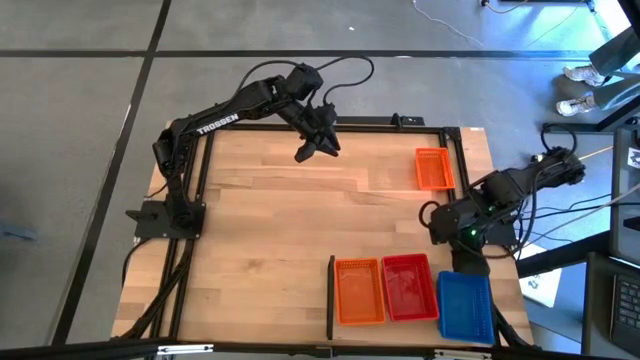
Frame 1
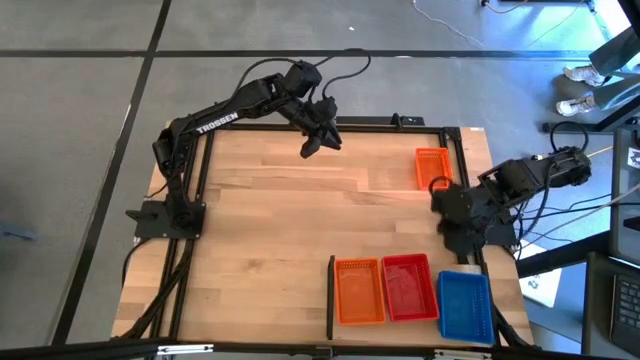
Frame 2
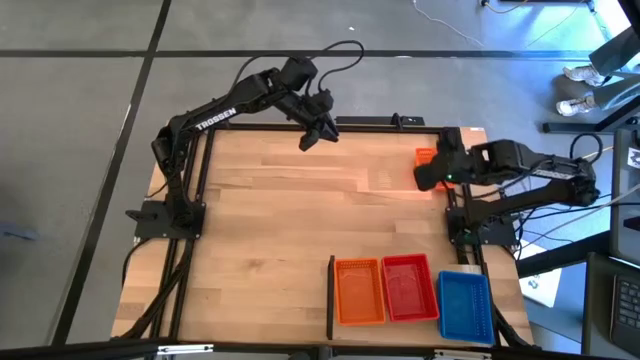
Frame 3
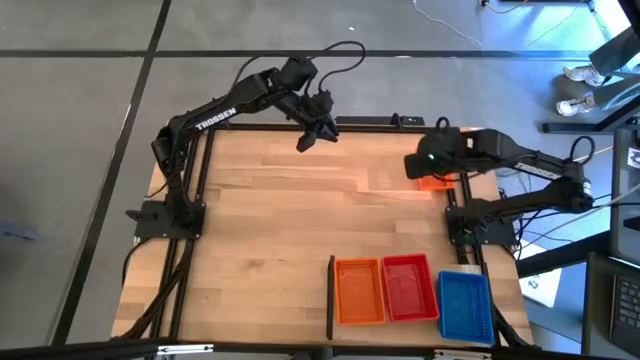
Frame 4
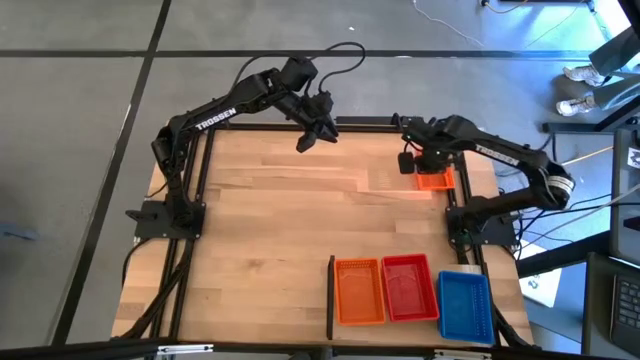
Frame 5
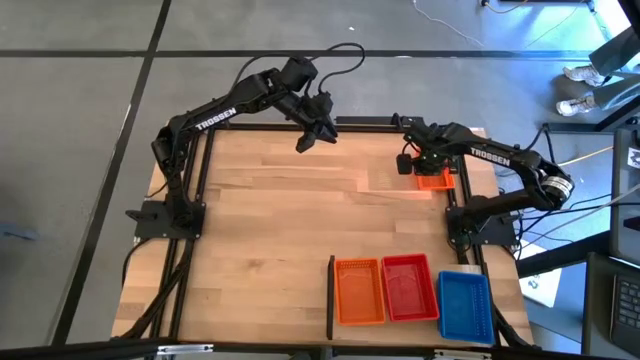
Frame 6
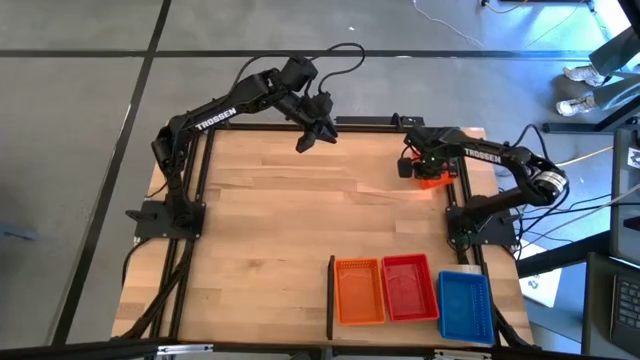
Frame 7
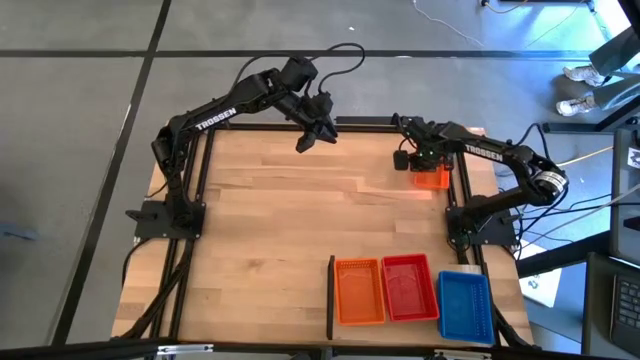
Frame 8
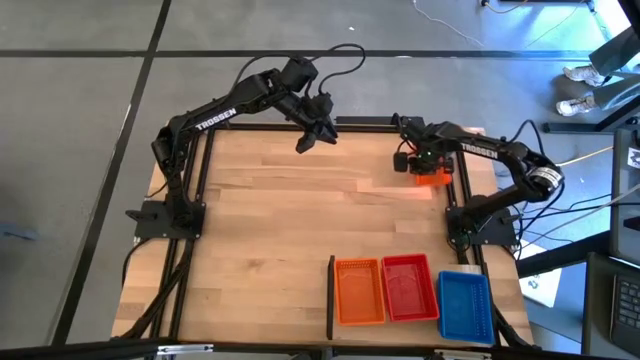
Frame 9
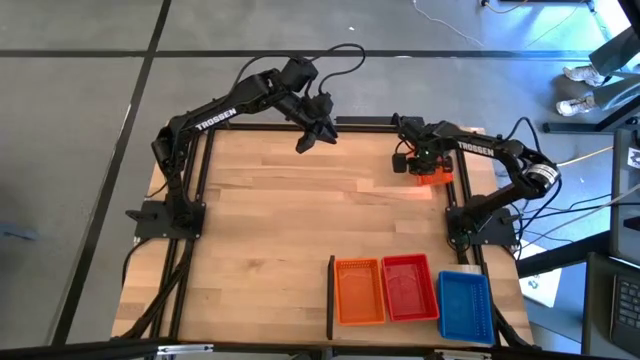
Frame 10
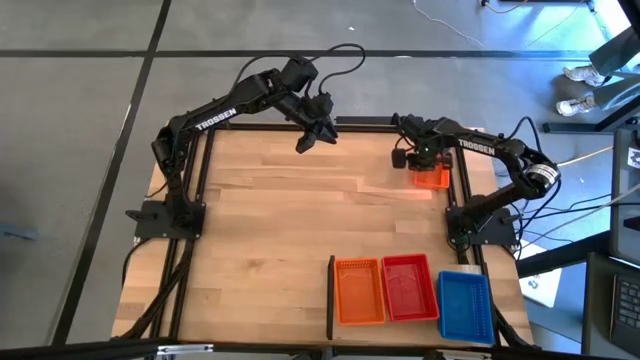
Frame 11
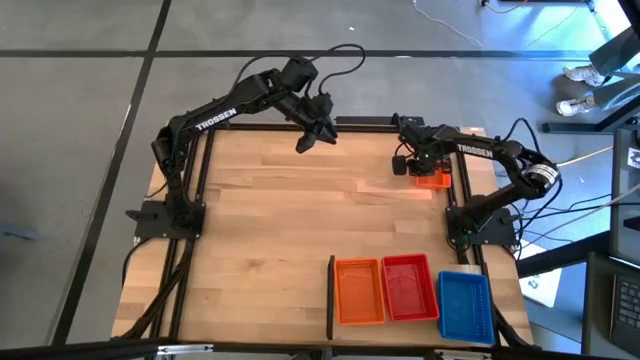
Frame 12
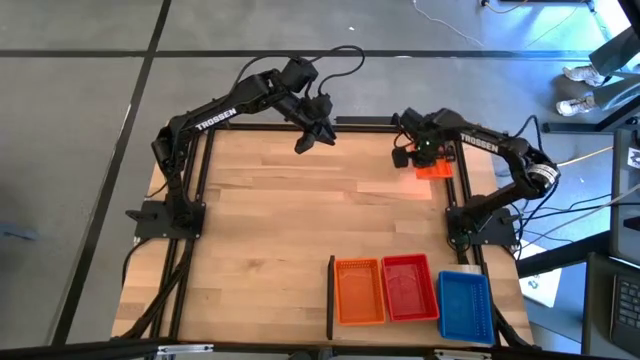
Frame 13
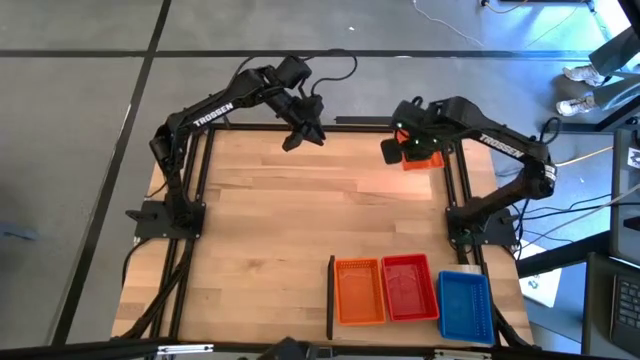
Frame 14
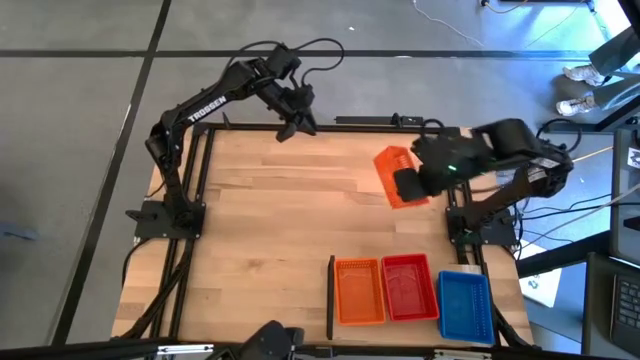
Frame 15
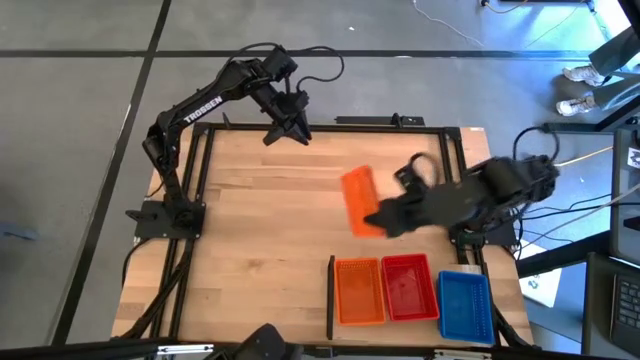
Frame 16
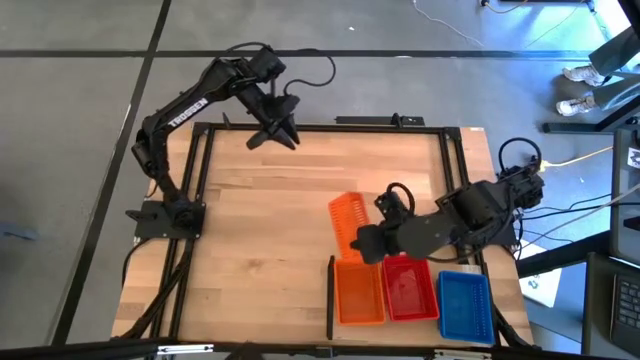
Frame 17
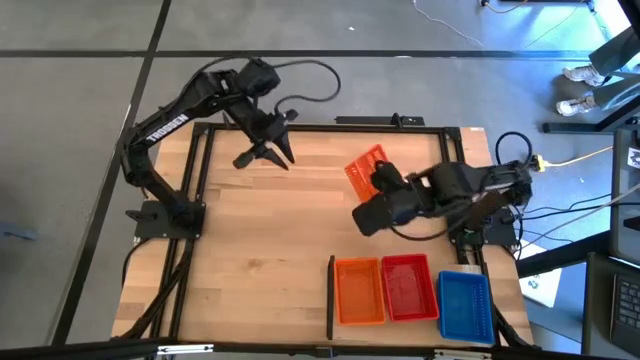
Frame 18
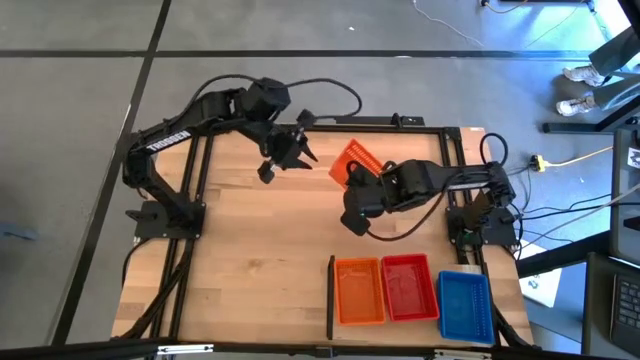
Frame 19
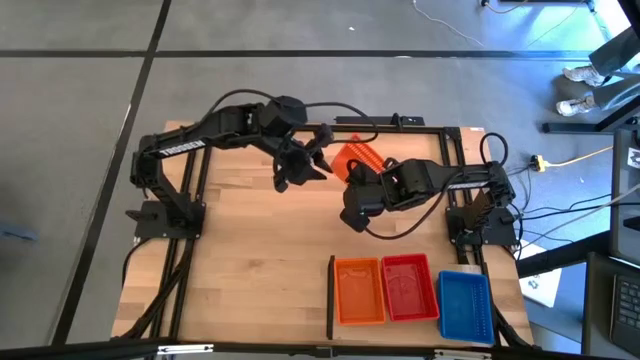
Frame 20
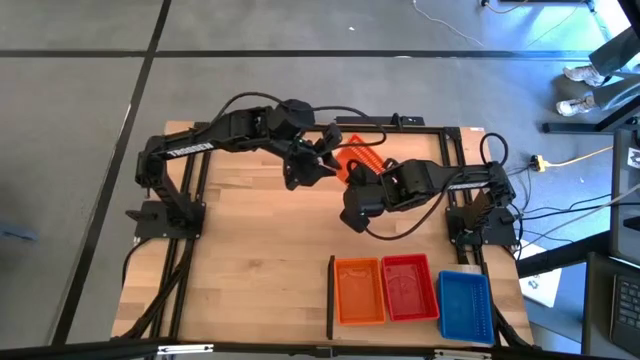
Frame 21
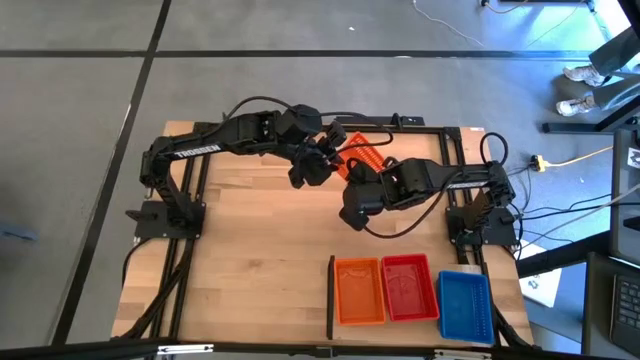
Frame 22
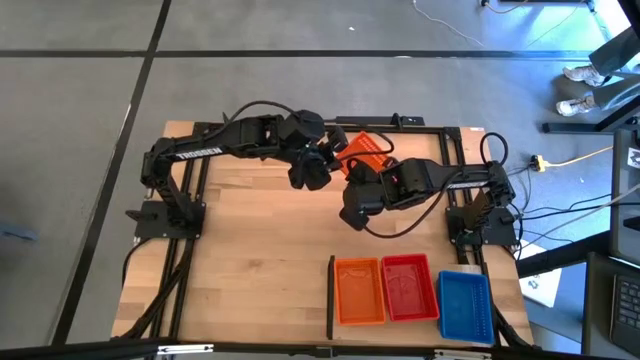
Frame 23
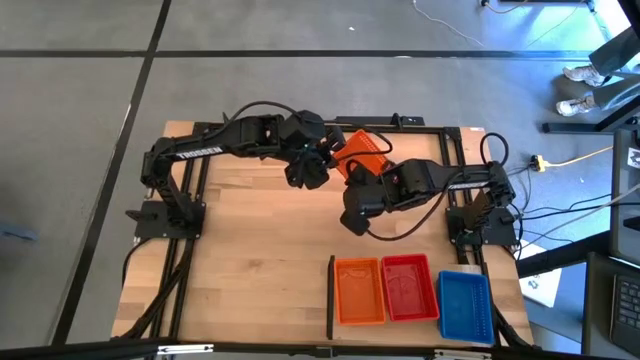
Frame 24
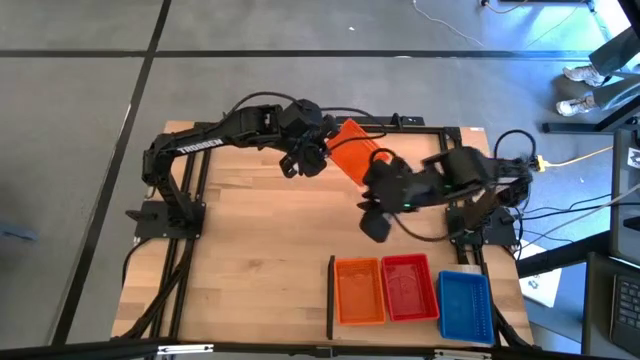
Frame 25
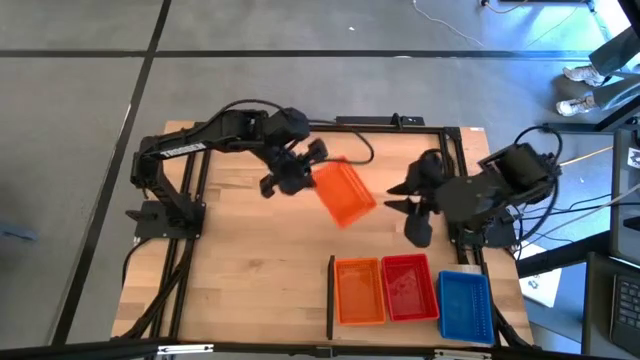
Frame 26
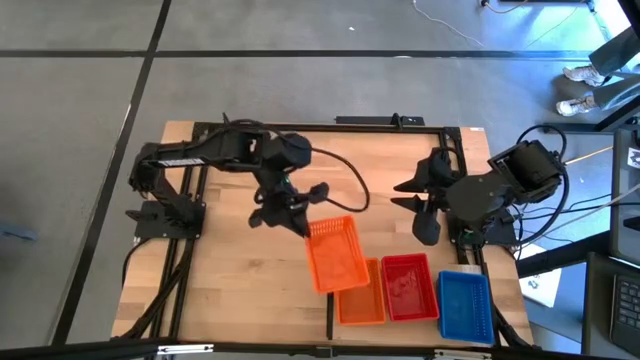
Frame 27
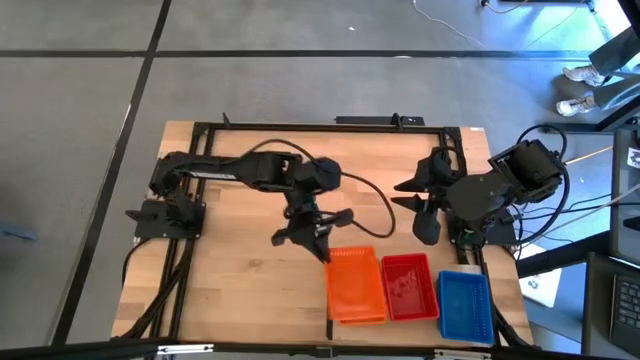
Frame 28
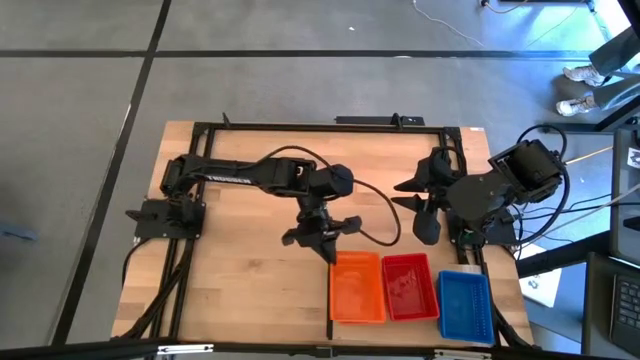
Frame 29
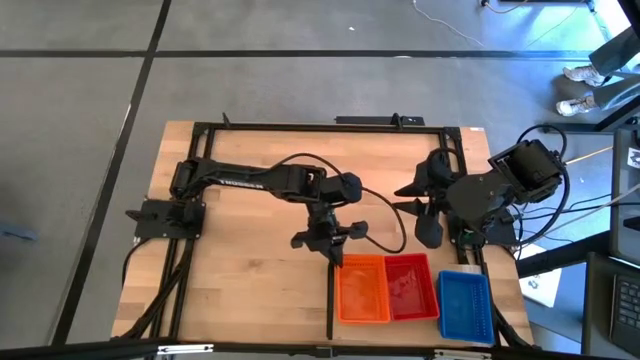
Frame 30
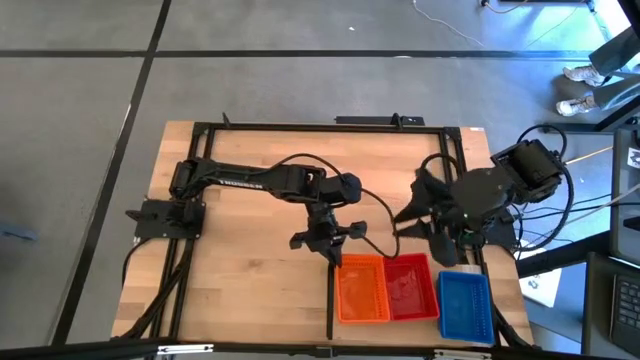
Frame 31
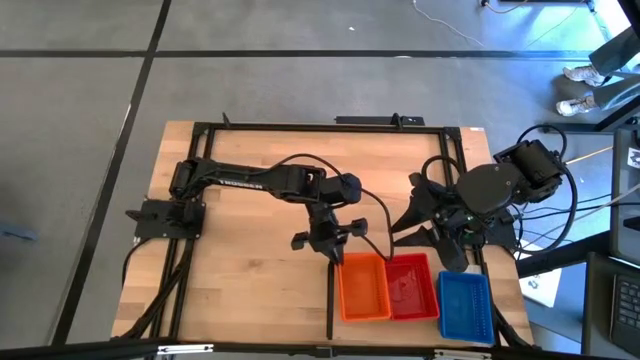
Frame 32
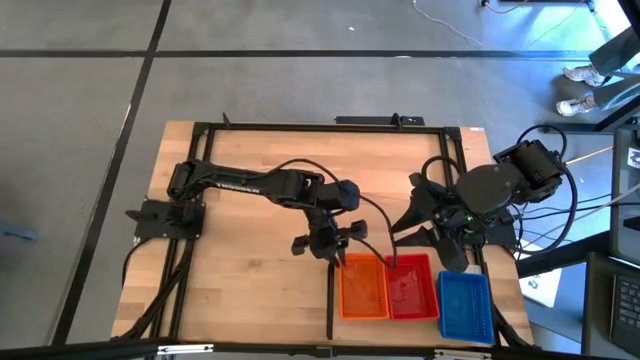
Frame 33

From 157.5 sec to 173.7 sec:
Task: Stack baskets on shelf by color
Stack the orange basket on top of the orange baskets on the shelf

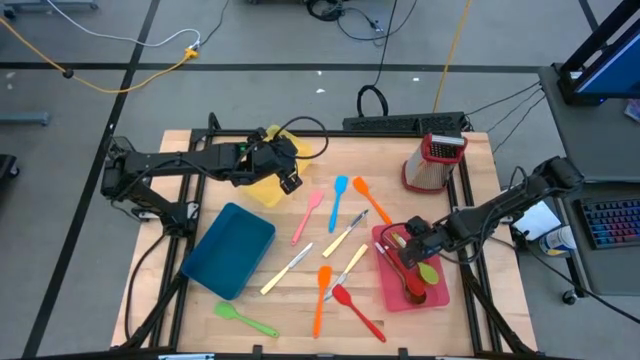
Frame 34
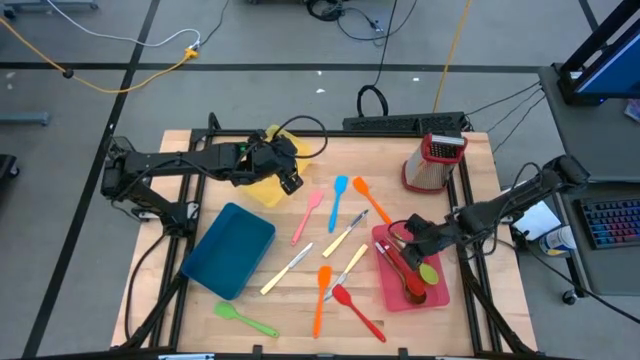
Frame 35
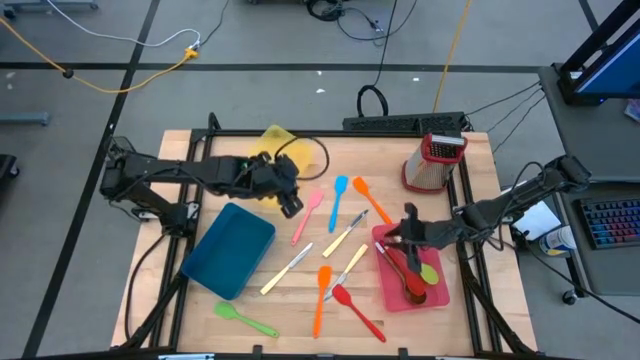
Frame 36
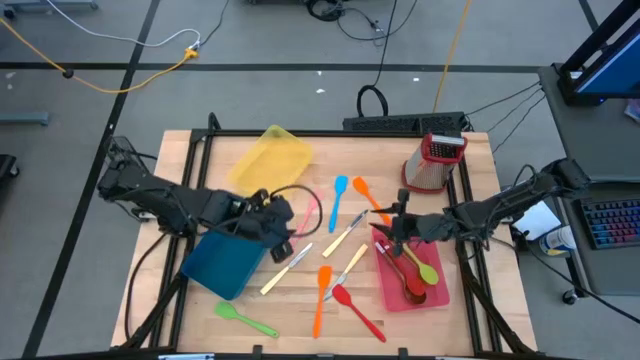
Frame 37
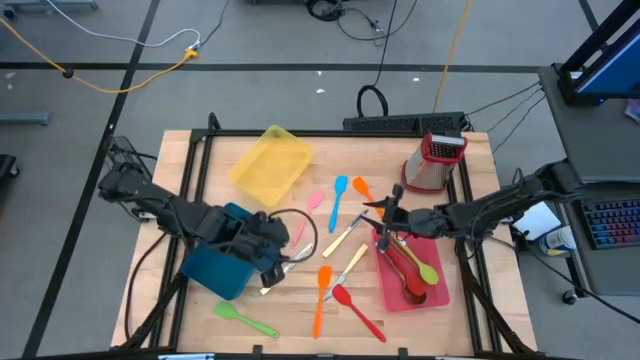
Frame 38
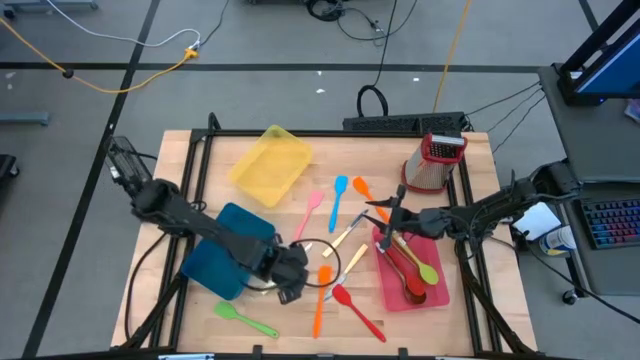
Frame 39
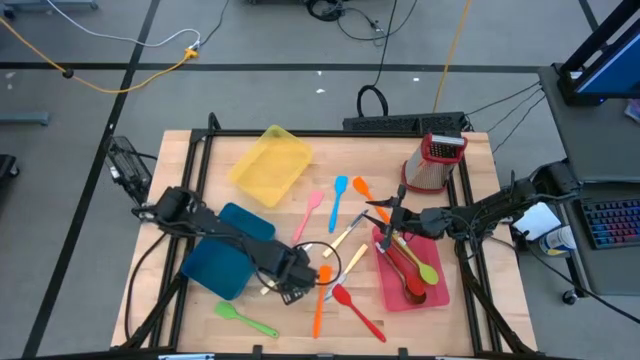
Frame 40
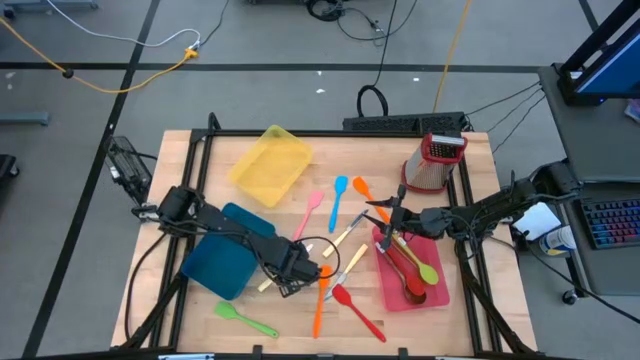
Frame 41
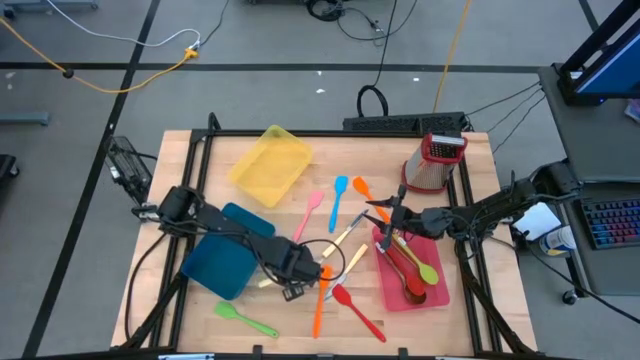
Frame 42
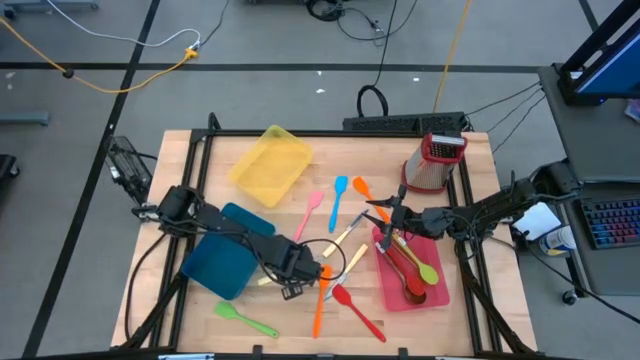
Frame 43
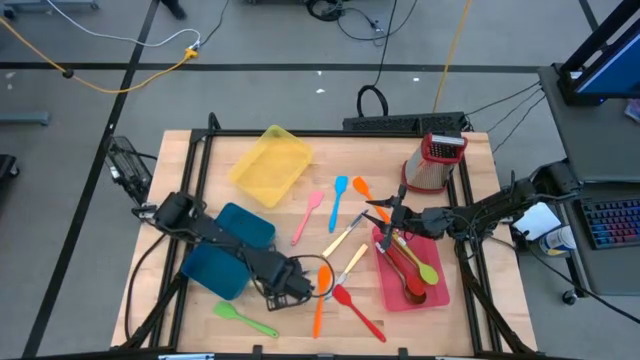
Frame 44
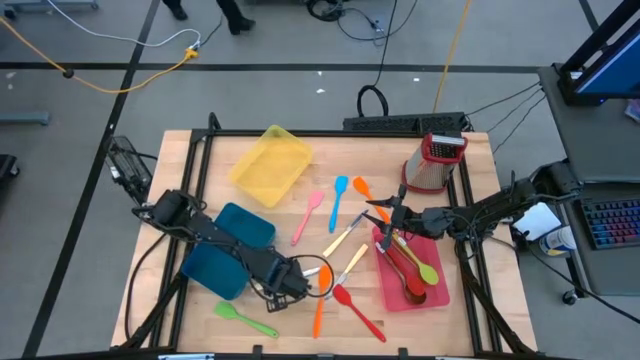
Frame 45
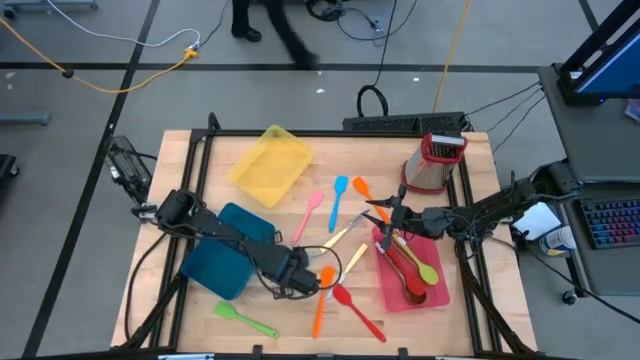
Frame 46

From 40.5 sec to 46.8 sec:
Task: Pick & Place Kitchen Items
Put the yellow knife into the yellow bin
